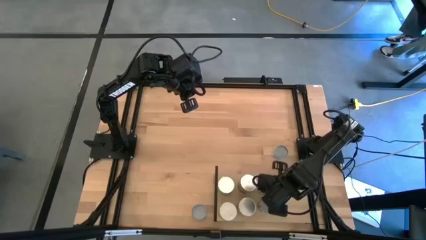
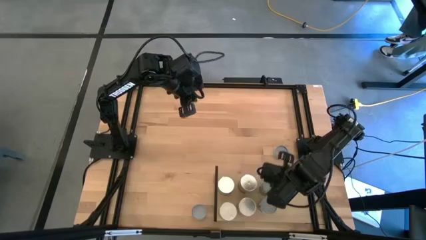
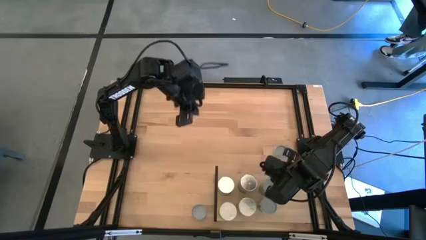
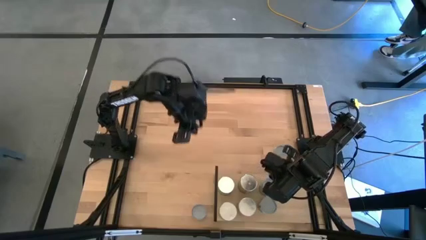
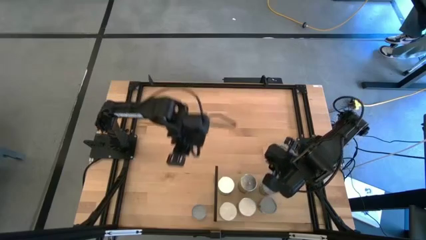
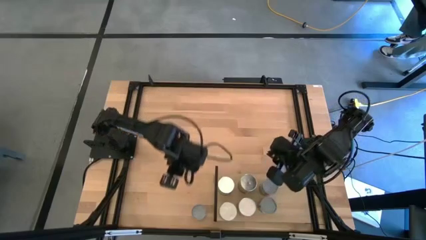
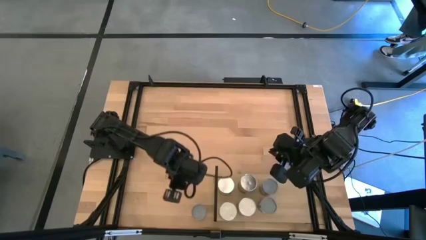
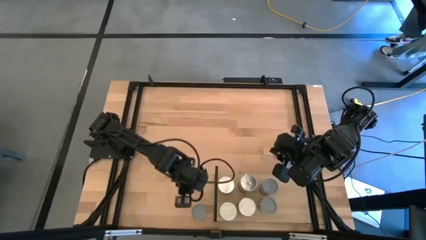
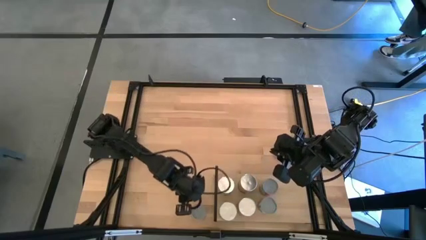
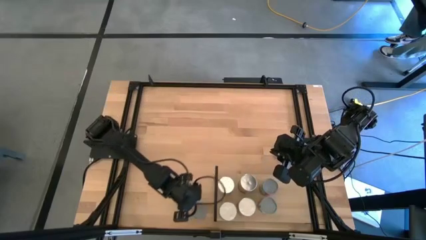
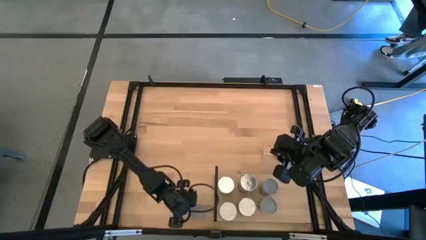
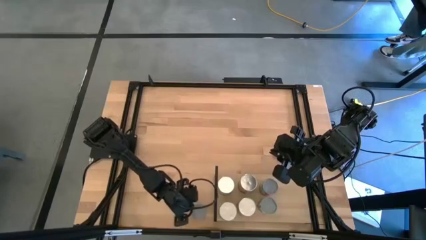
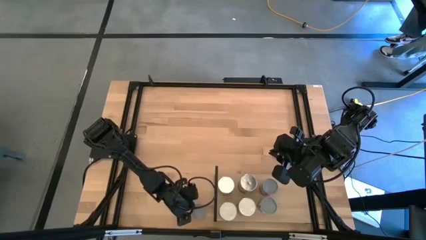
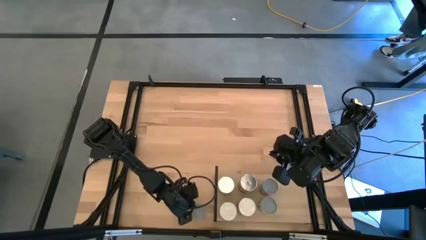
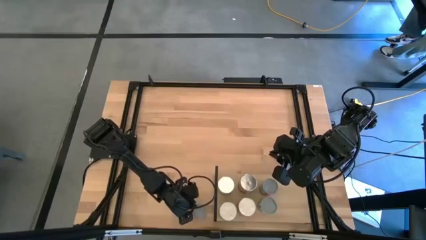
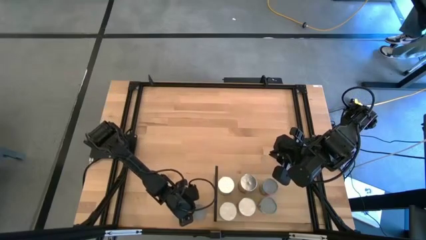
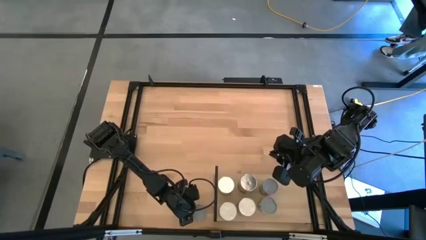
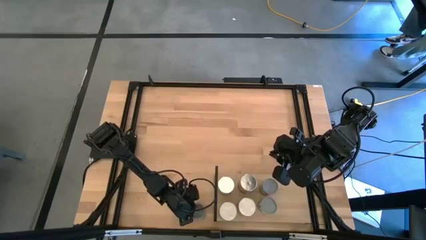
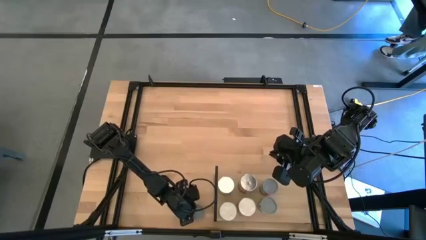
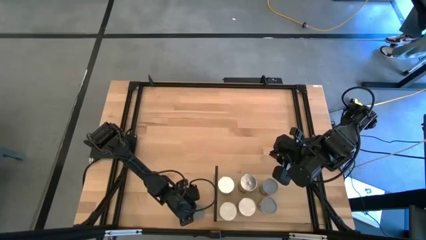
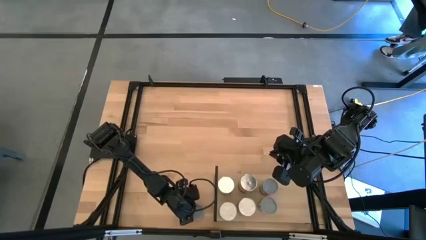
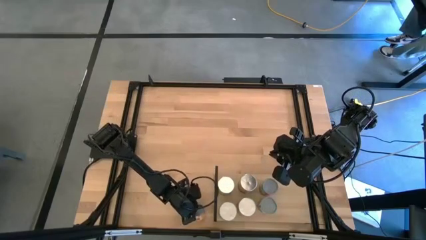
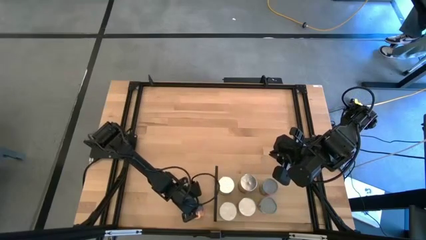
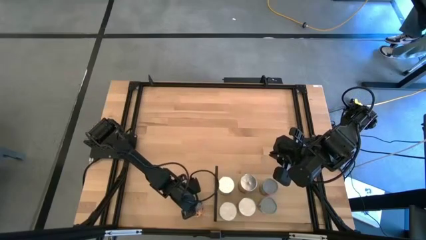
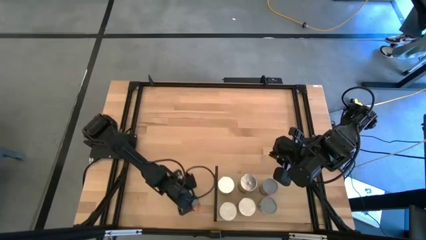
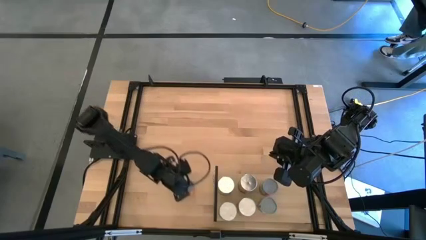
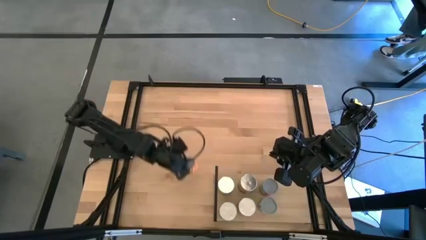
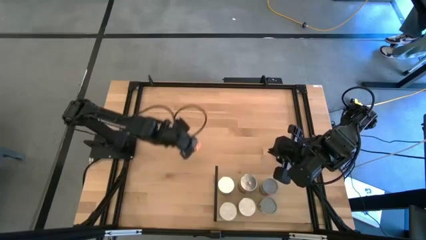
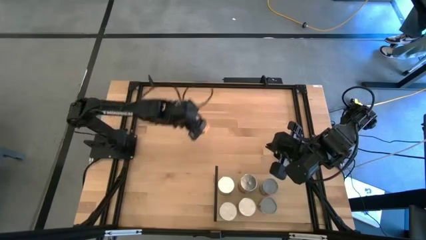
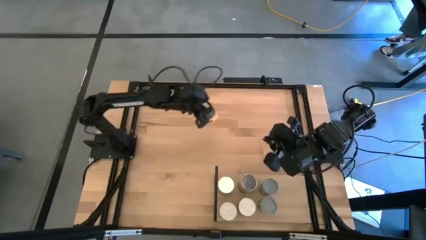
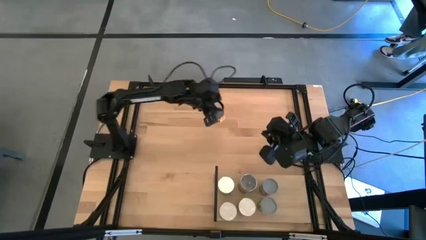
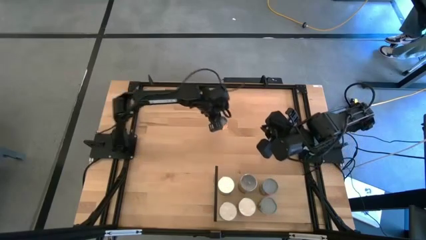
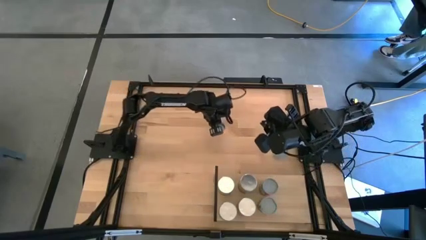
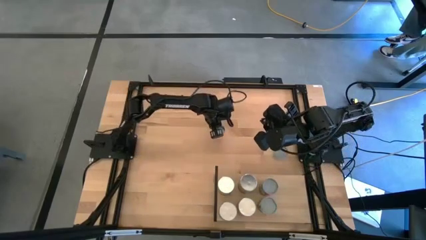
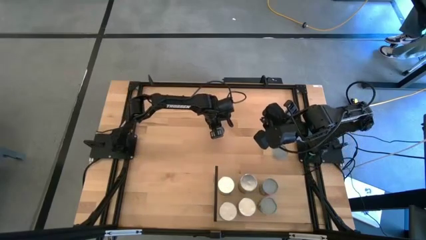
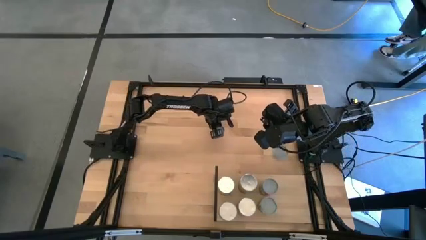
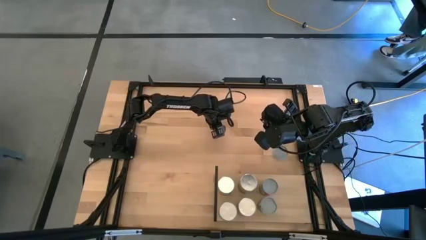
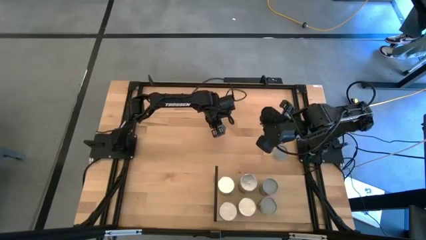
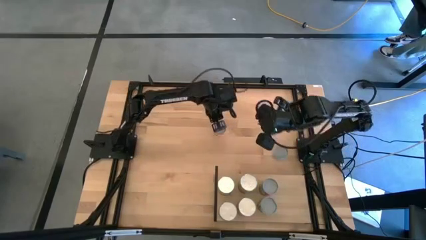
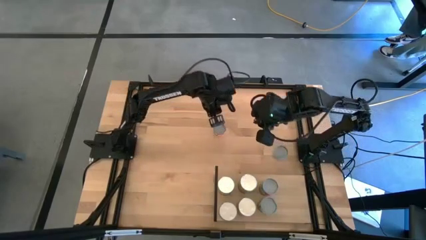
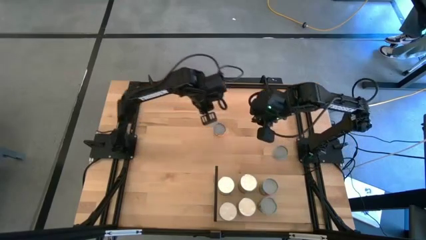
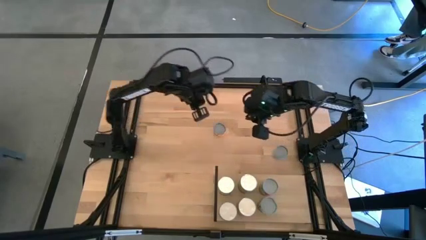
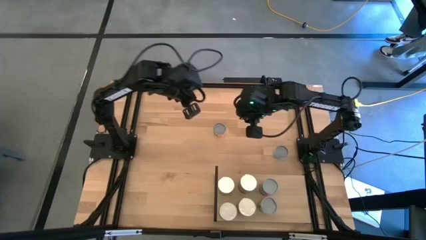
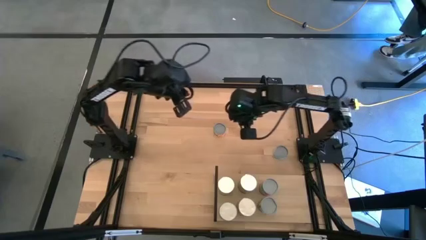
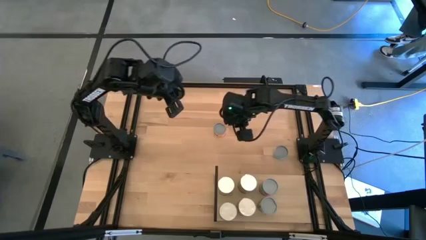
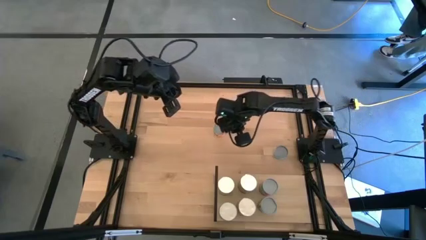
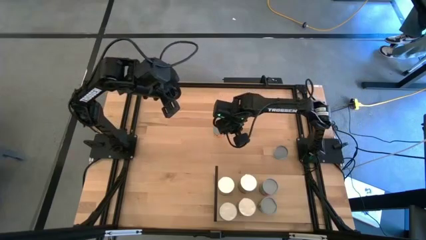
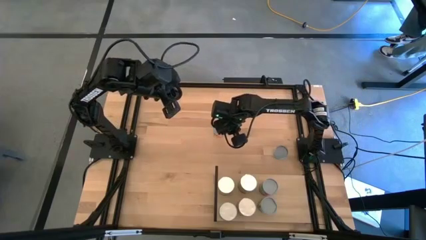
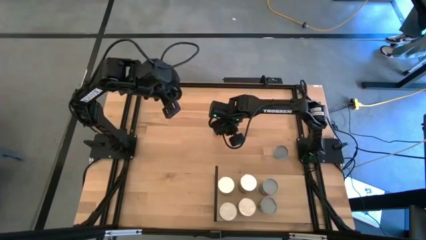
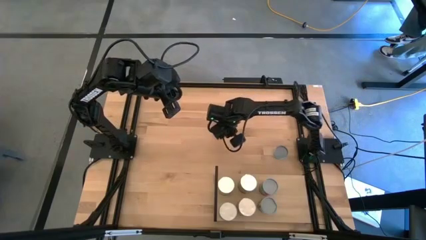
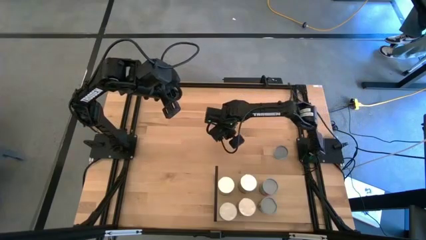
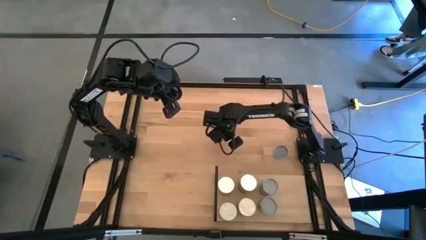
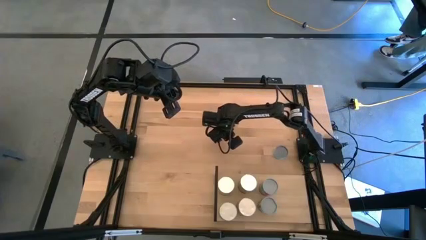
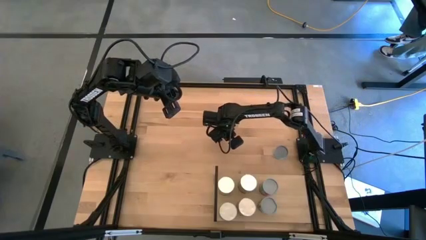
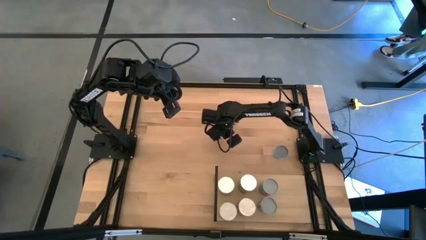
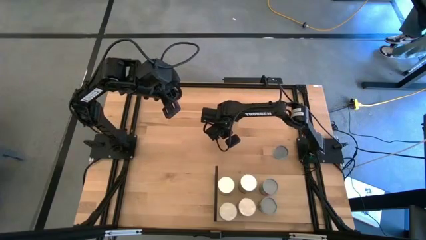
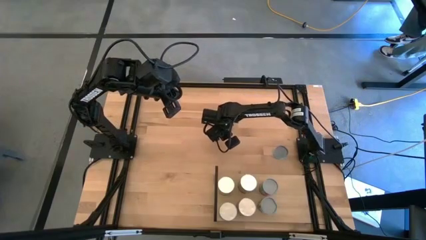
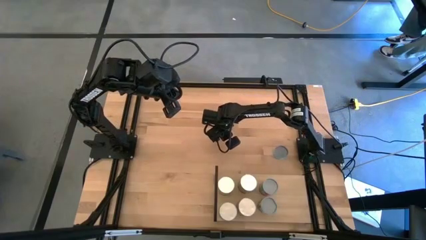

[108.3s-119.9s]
Task: Pick and place cans onto a shelf
Put the canned orange on the shelf
